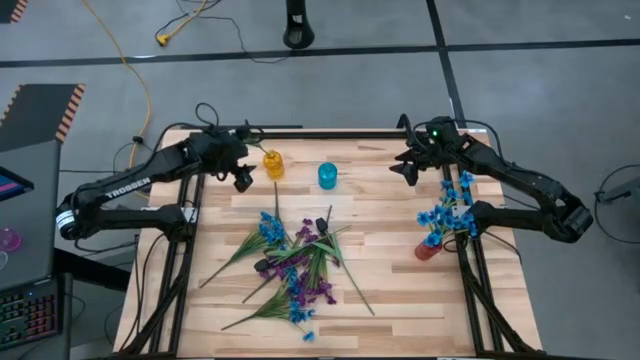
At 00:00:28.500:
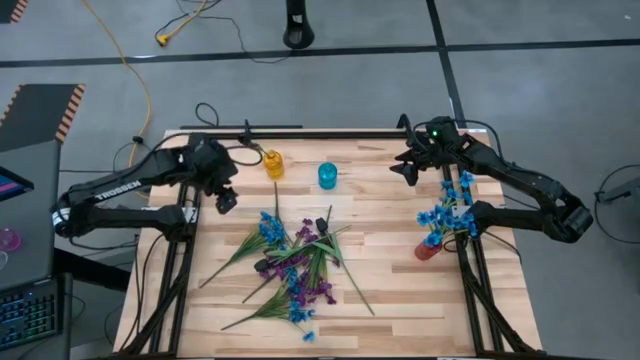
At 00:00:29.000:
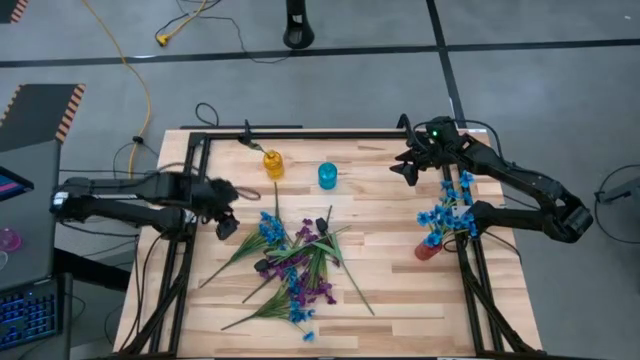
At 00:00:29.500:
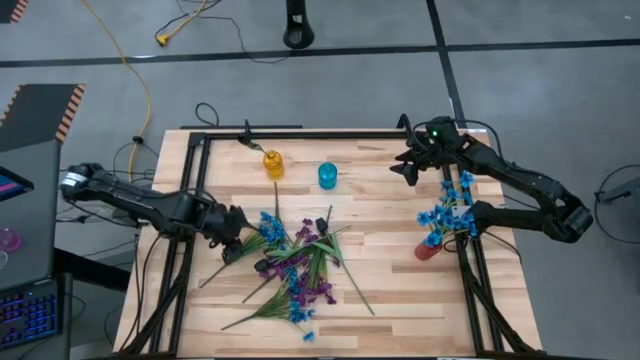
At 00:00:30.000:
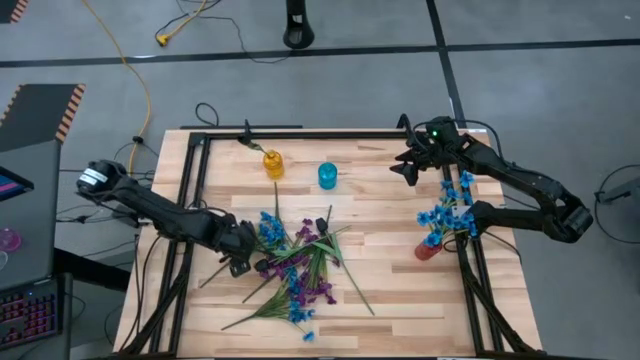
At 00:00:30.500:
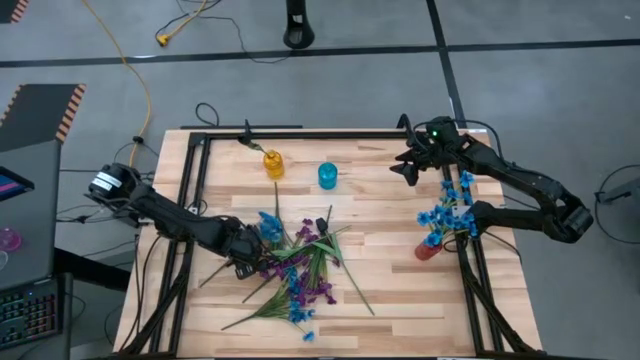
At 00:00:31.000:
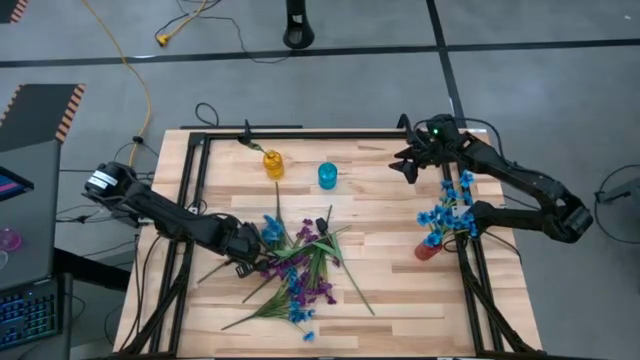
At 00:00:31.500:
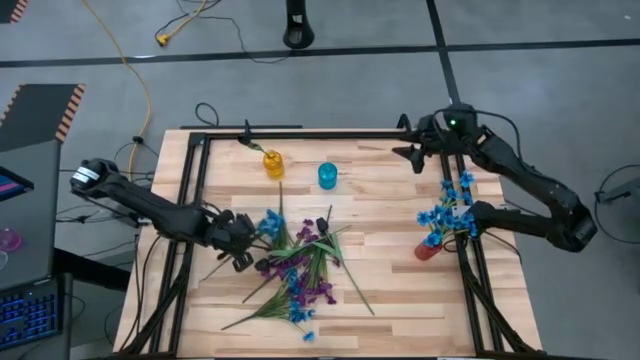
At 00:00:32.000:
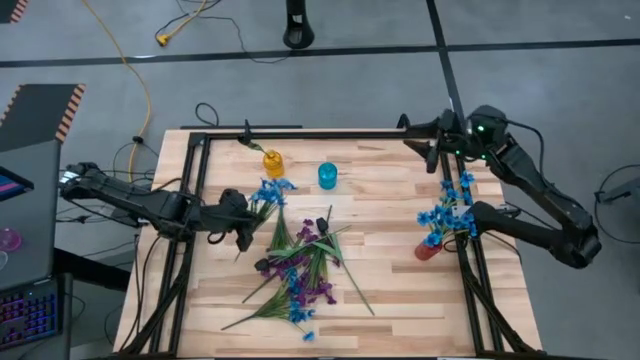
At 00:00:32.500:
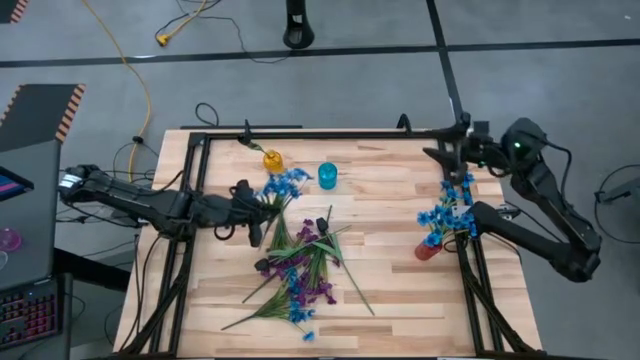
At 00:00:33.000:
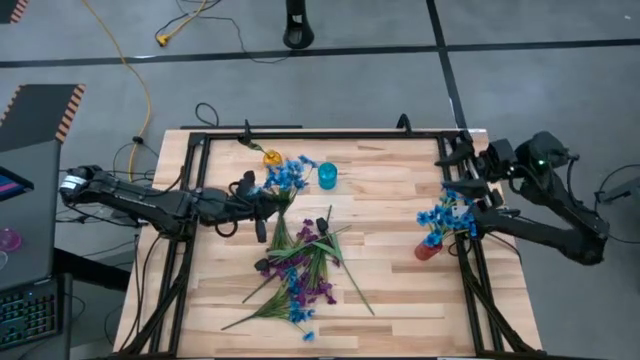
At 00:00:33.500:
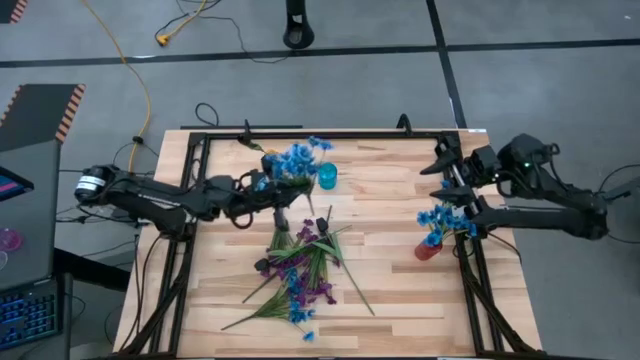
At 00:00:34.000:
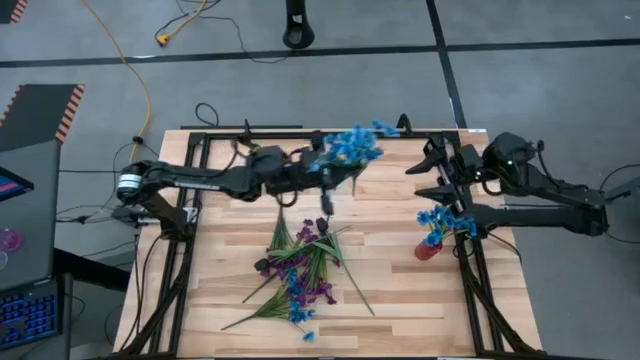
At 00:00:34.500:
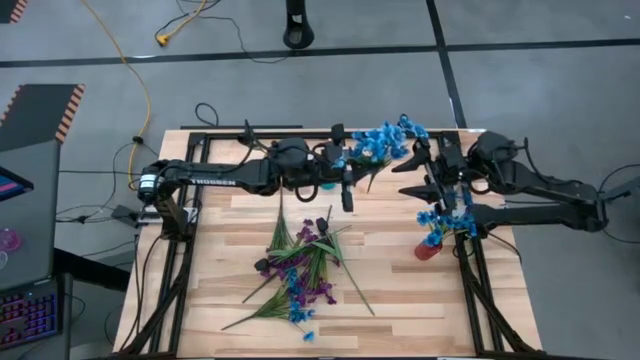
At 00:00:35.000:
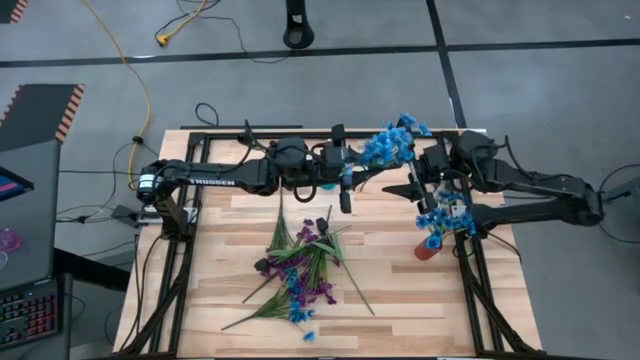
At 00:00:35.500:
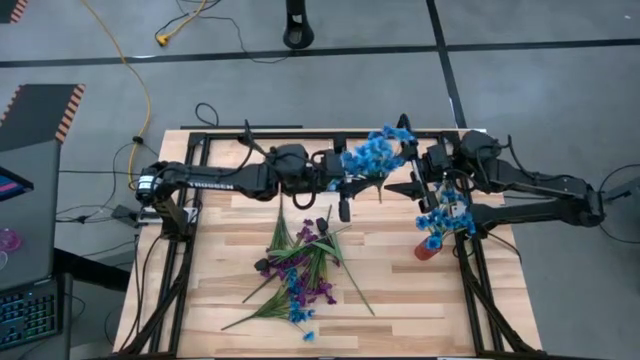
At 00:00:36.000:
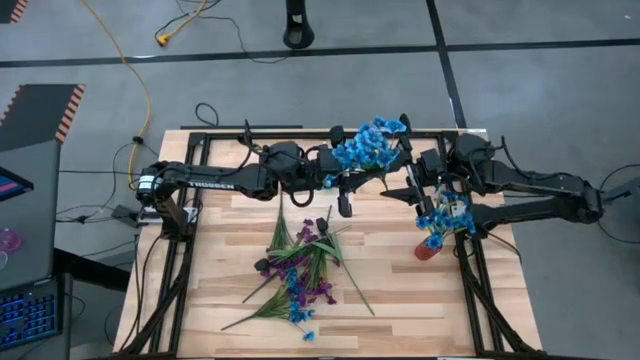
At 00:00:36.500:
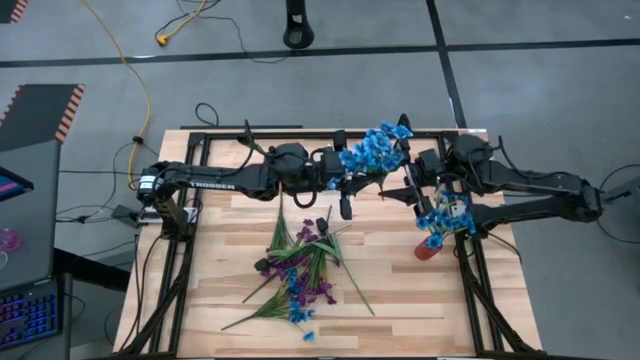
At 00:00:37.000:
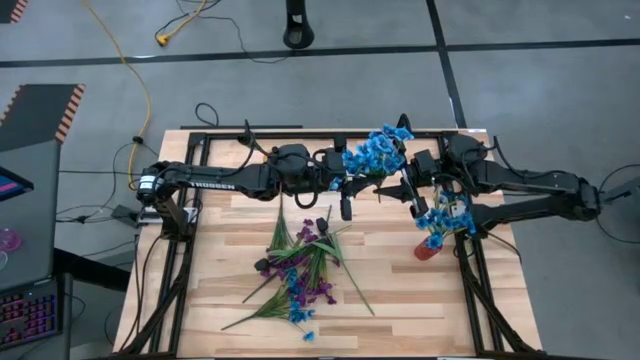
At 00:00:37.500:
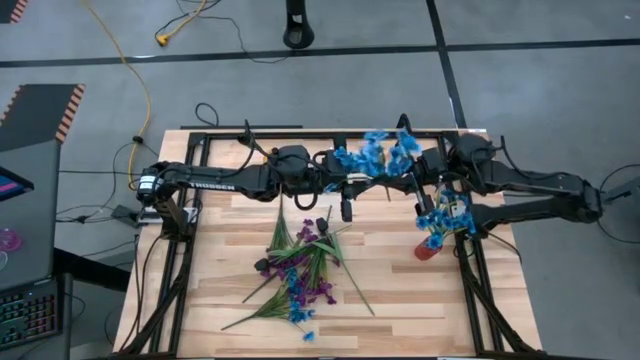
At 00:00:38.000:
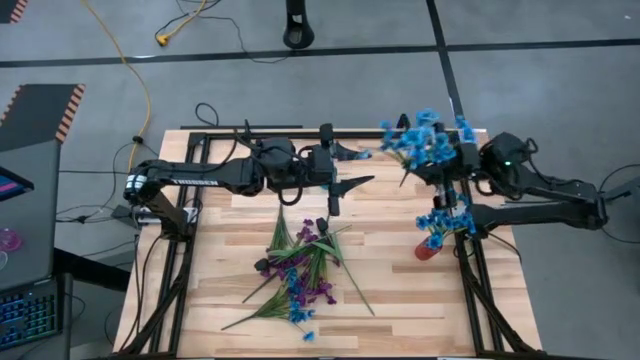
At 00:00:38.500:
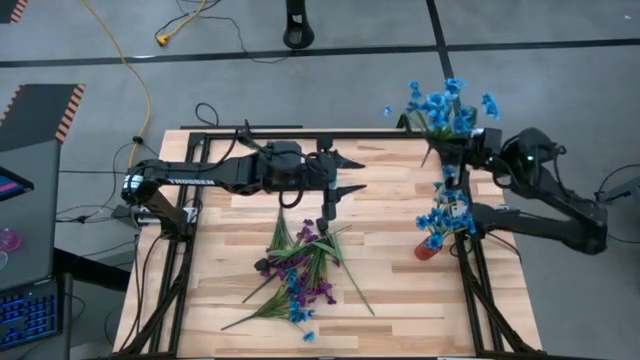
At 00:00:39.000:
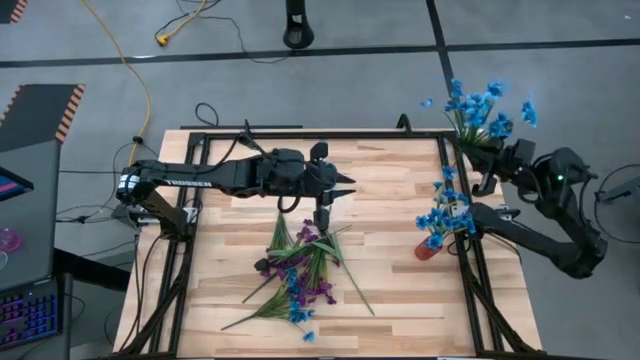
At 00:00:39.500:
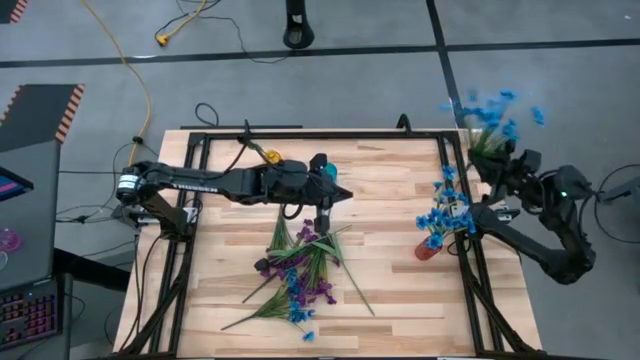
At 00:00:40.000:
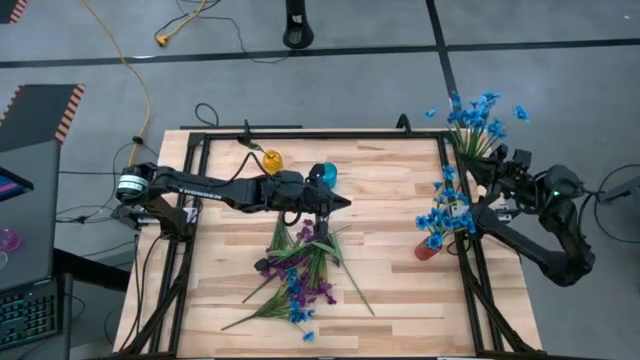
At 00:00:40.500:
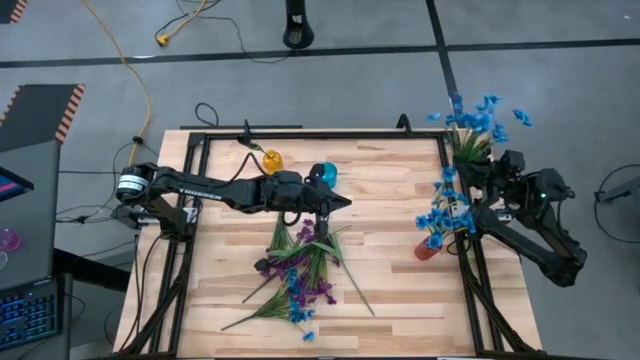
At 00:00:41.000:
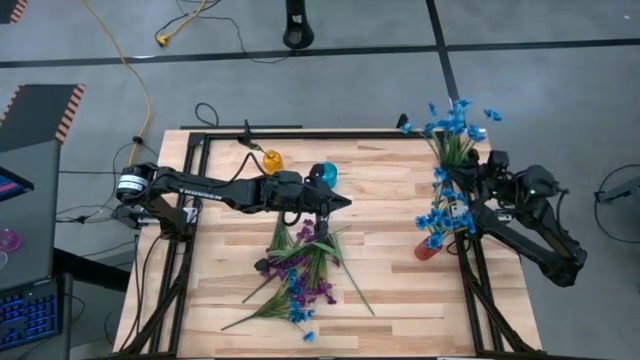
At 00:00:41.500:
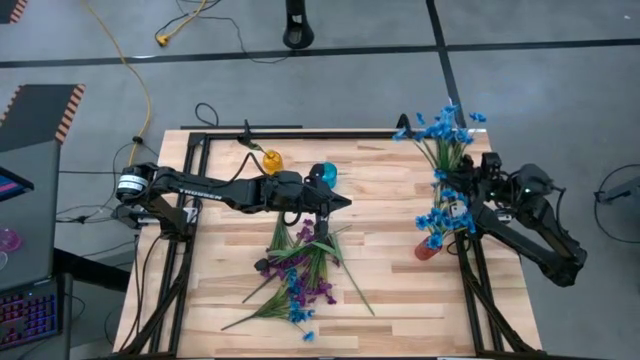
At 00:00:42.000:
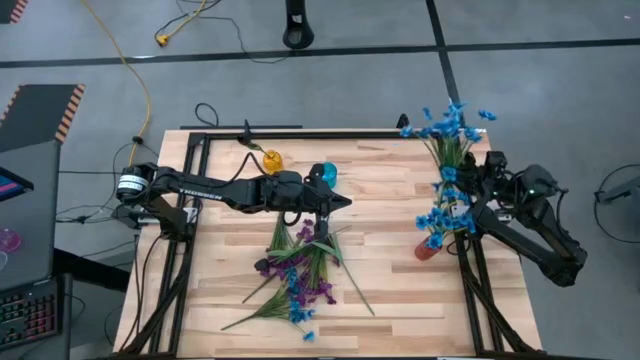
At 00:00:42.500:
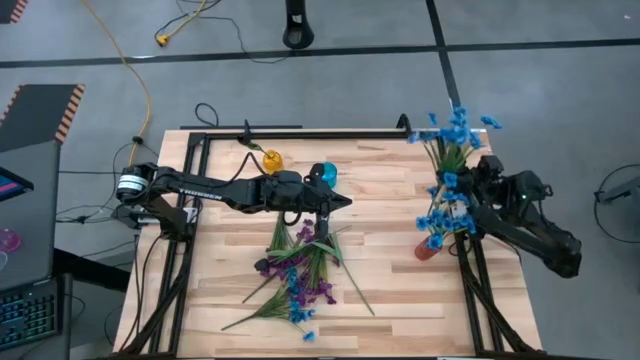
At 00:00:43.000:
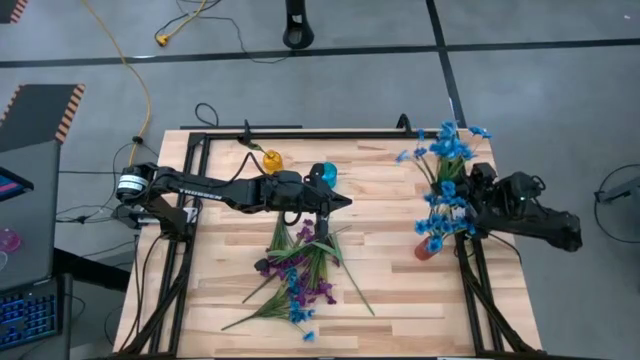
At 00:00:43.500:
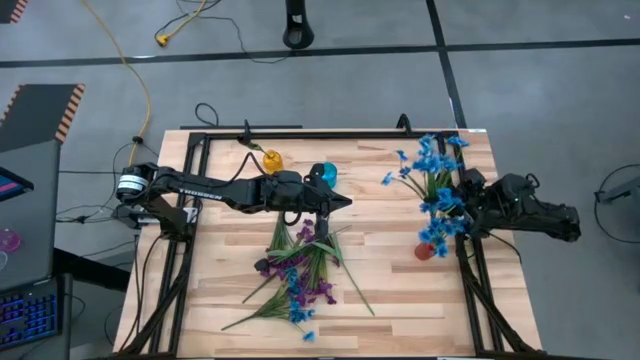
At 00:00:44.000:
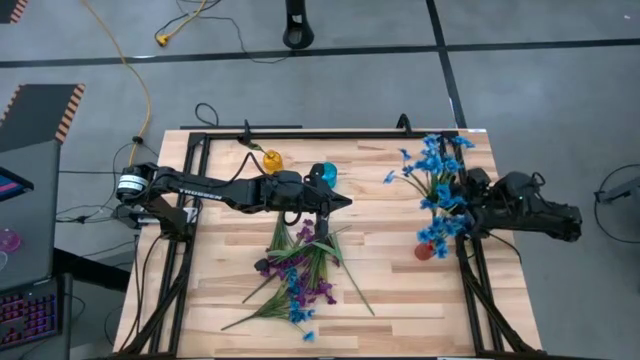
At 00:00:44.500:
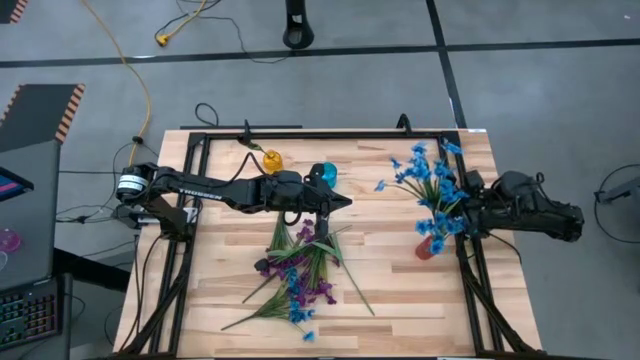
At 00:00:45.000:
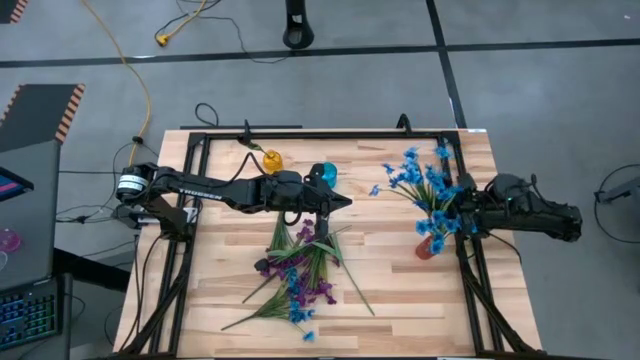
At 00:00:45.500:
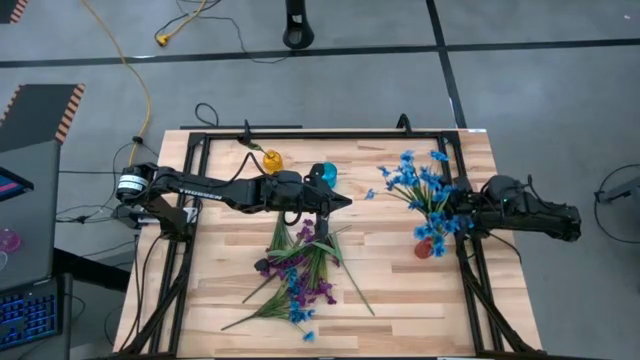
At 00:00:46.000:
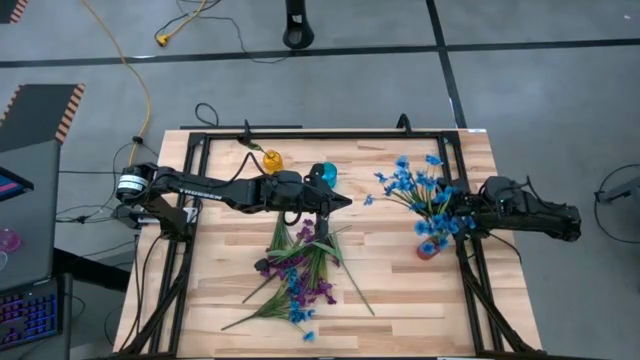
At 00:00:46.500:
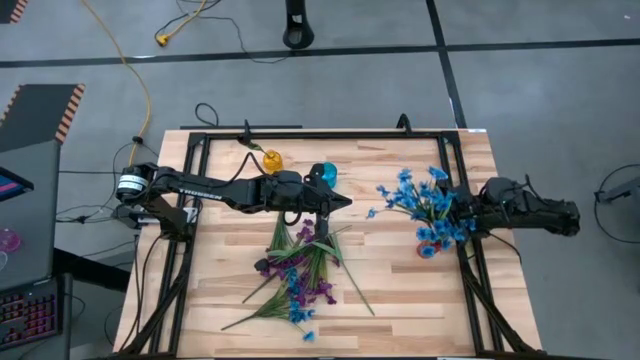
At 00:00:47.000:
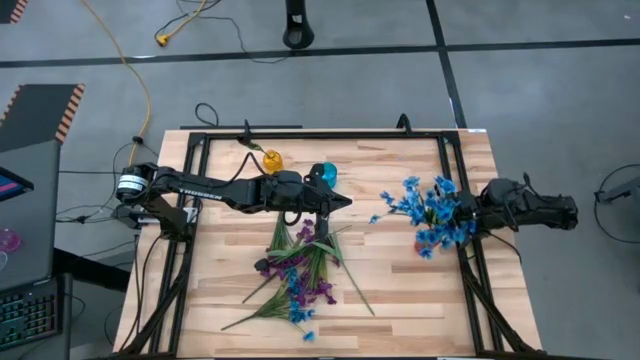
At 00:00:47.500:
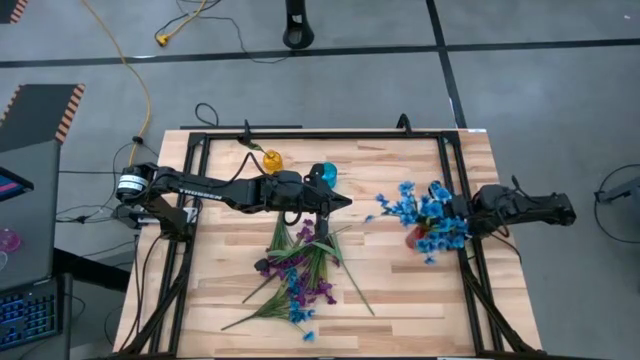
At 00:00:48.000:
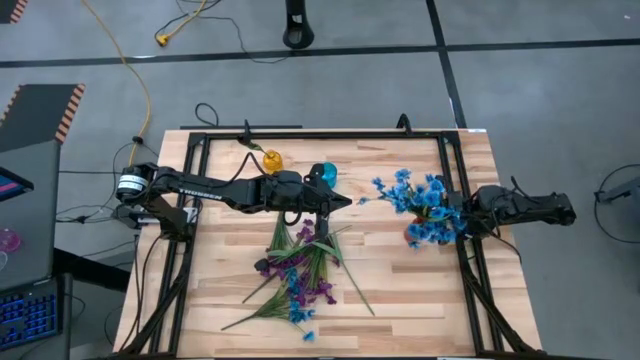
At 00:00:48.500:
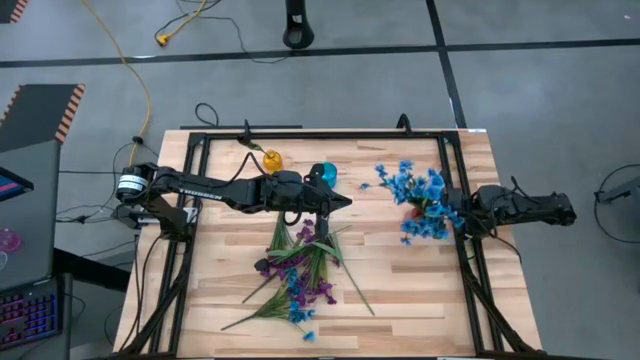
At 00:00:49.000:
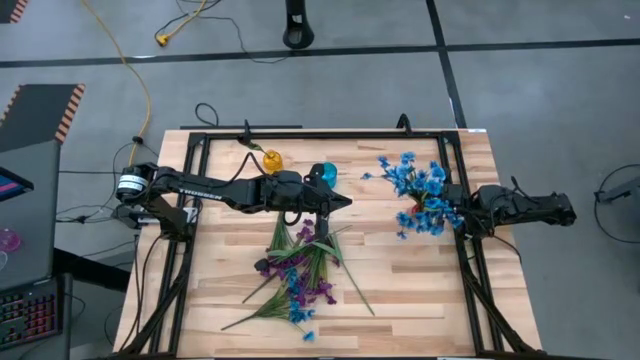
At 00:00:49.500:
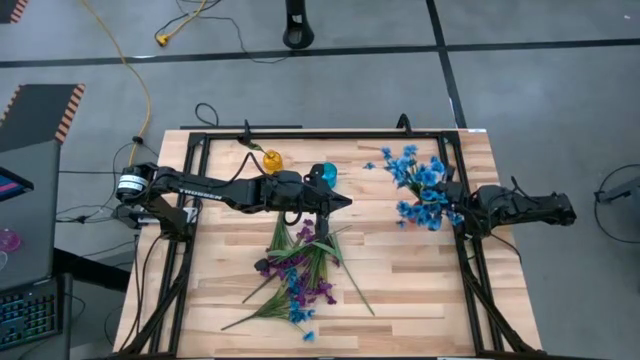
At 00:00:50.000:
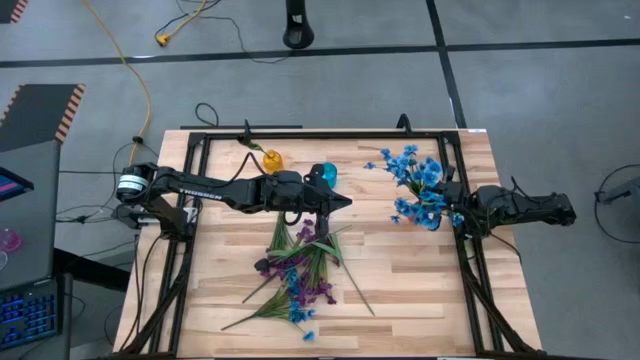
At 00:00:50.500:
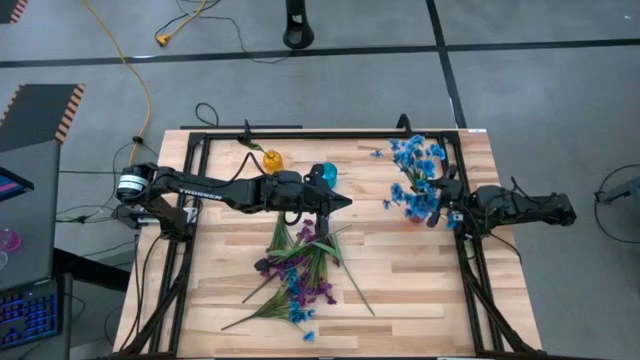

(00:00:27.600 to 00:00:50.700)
Task: Sort flowers into vase by color
Put the top blue flower into the red vase
